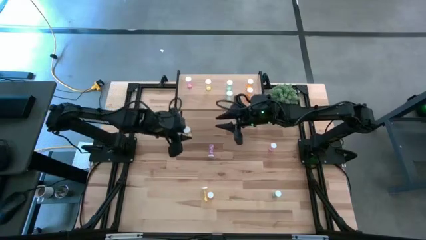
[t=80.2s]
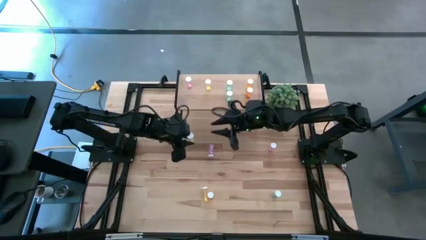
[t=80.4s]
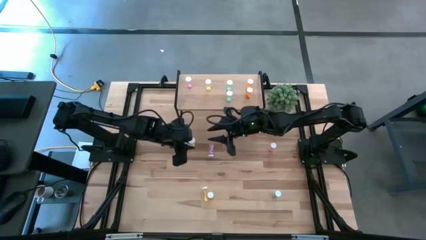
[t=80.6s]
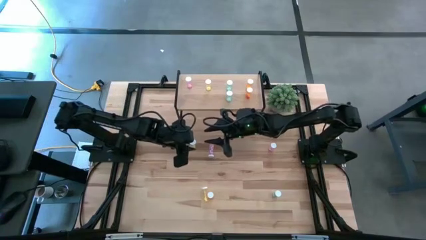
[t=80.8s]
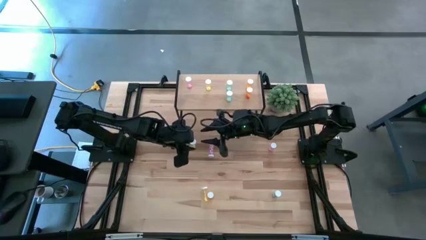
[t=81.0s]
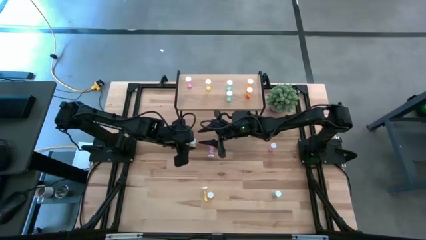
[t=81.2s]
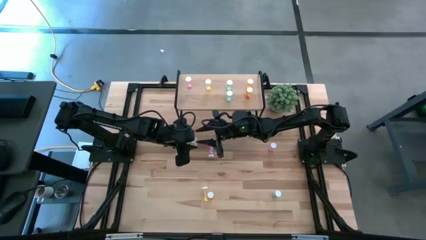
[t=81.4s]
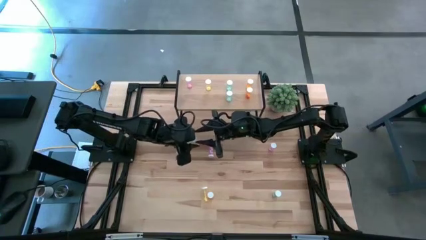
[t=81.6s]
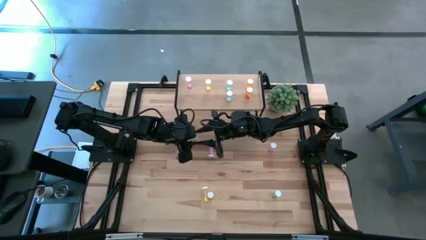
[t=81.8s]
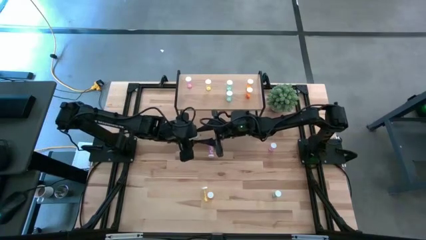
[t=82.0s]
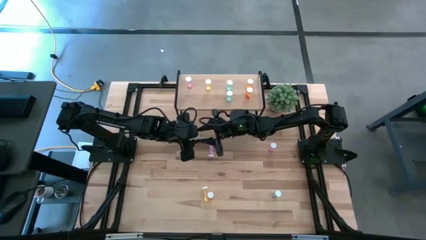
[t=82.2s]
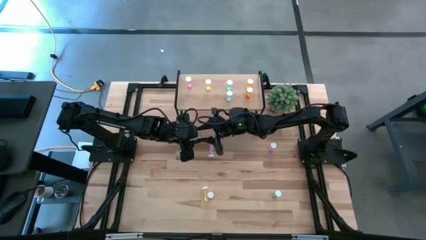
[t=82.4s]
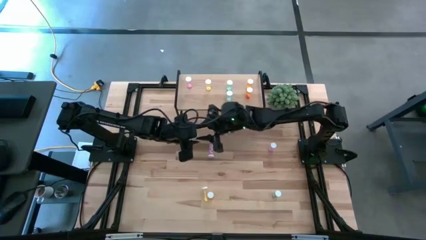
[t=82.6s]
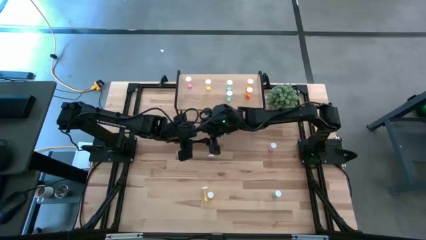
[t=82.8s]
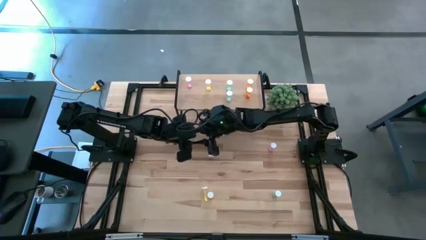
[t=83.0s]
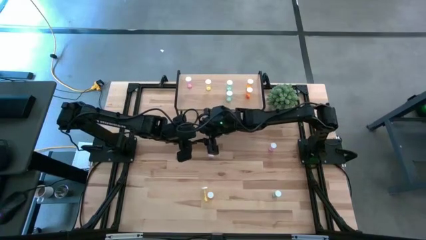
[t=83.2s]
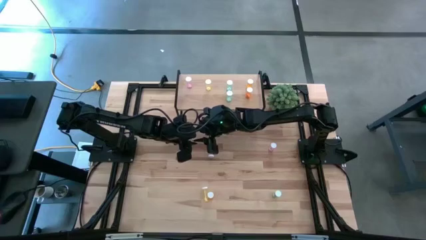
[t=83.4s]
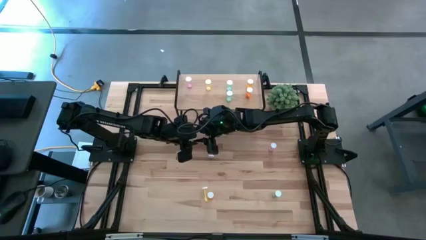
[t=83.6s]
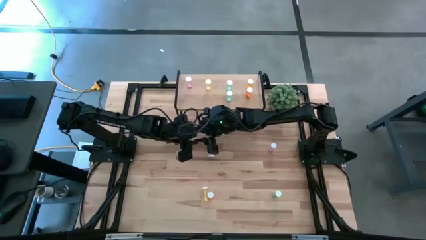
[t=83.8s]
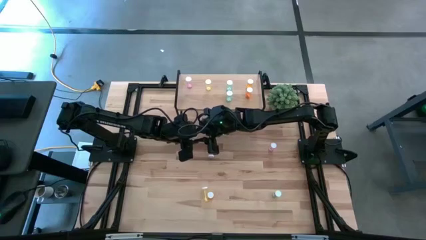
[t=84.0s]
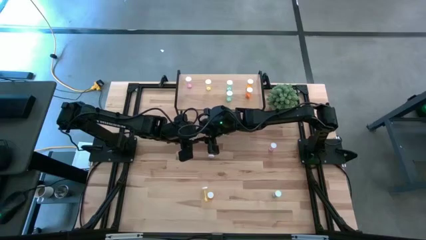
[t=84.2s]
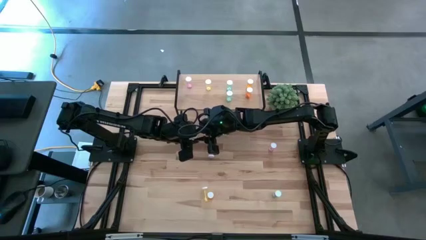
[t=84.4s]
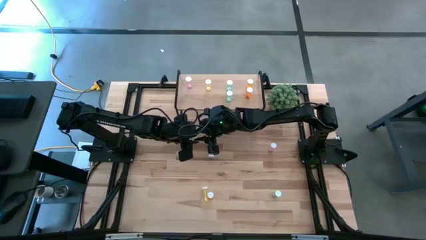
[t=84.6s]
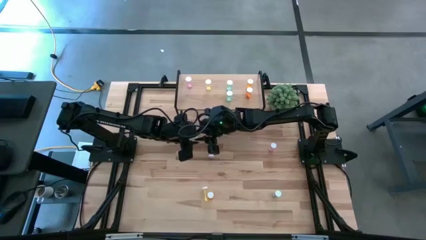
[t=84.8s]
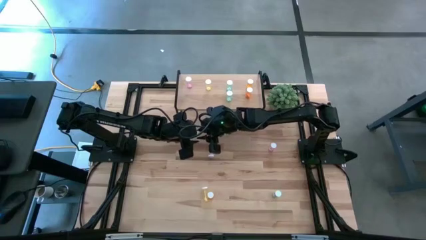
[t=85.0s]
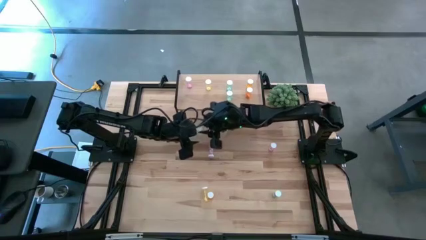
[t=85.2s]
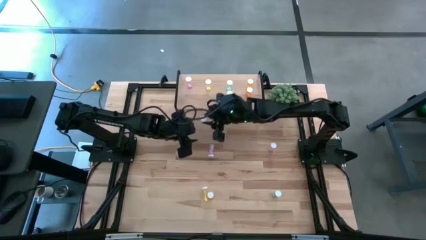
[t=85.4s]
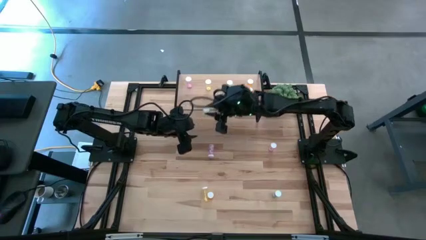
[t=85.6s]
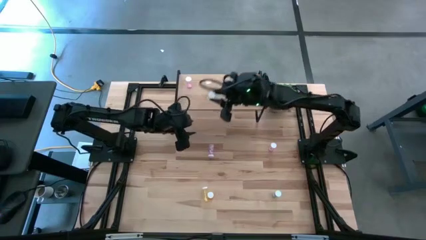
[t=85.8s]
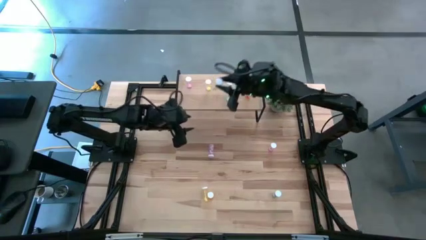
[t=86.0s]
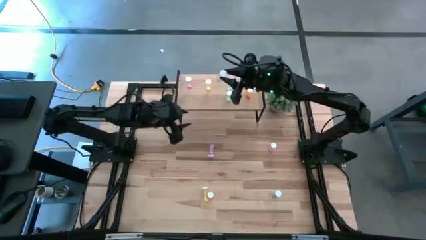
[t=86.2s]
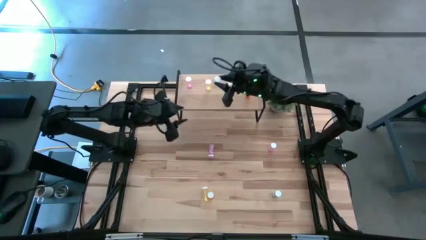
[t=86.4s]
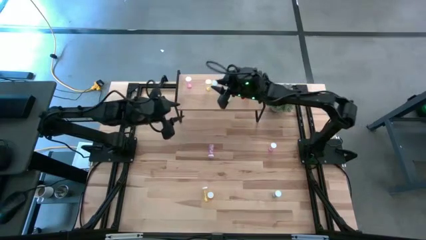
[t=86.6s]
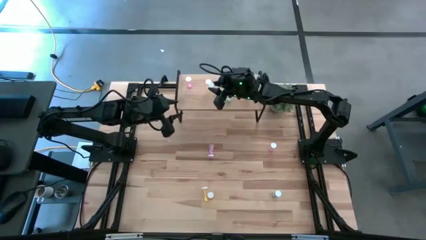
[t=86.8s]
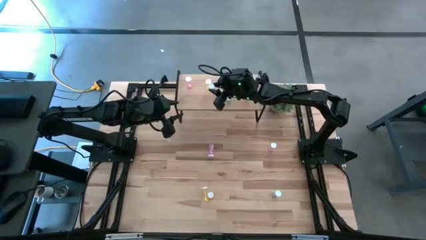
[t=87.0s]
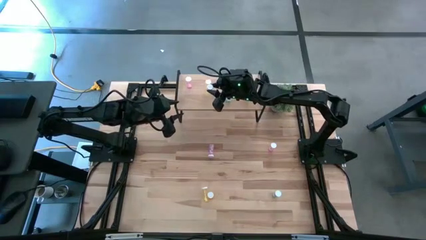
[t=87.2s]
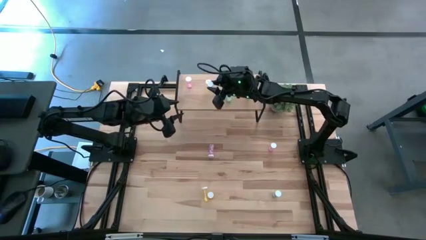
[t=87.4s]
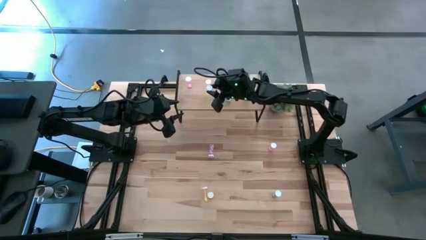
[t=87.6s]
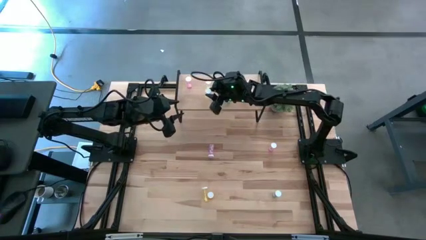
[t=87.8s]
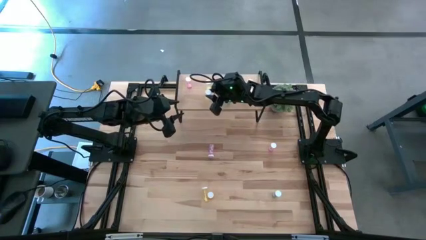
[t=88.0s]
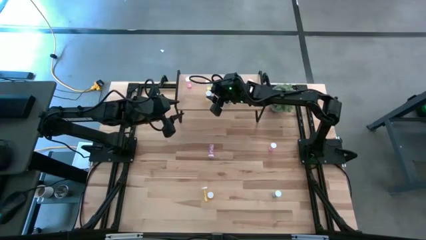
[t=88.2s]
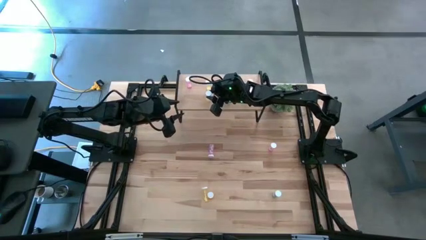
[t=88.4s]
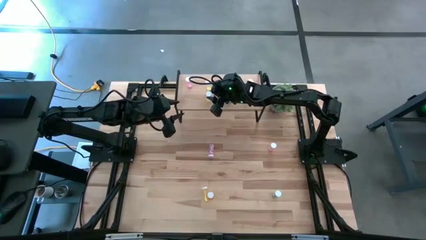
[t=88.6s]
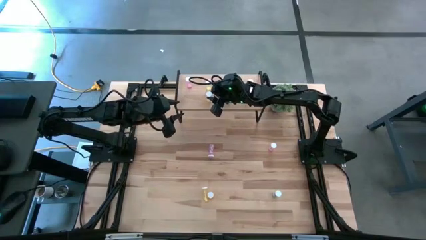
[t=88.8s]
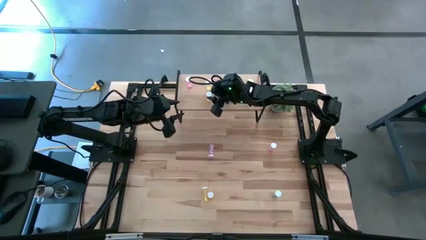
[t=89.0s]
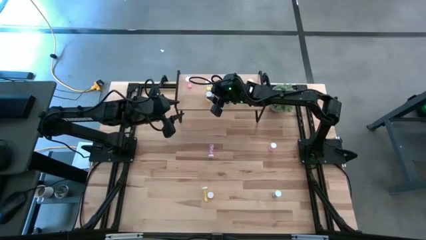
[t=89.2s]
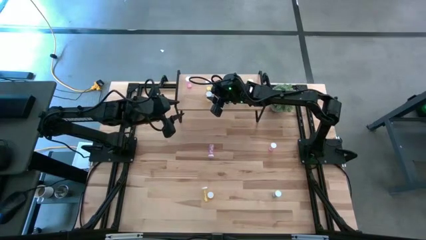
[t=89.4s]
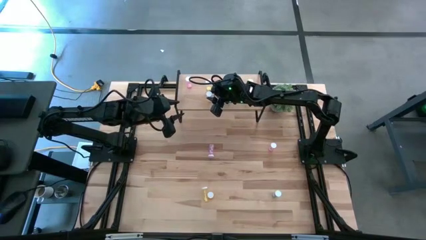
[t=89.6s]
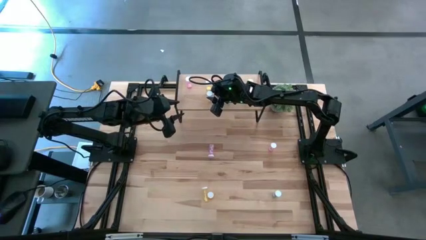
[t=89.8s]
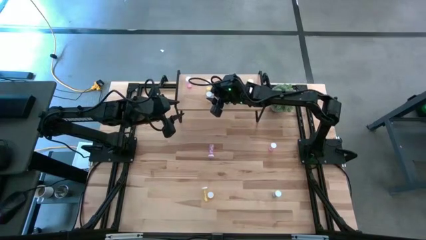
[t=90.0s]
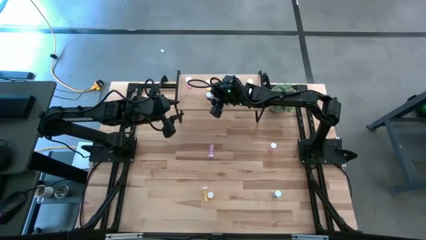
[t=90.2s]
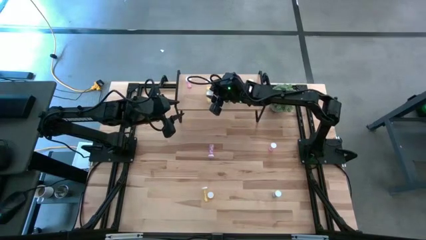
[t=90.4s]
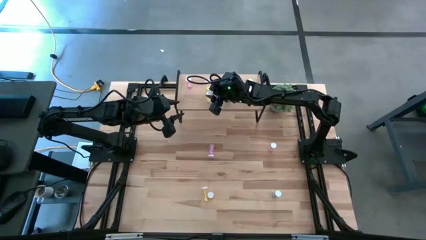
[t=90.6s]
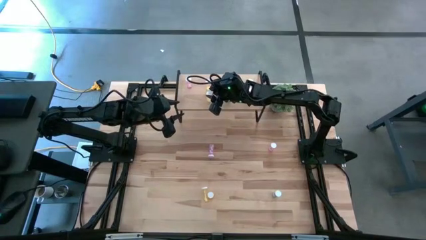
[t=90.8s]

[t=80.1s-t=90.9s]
Task: Pick and place medicine bottles onto shelf by color
Put the top yellow pill bottle aligned with the other yellow pill bottle on the shelf

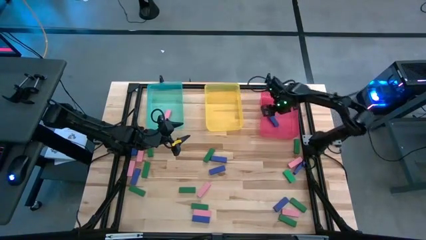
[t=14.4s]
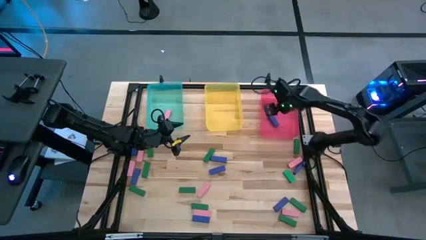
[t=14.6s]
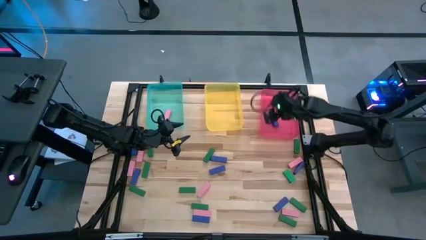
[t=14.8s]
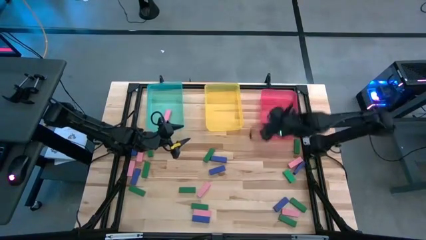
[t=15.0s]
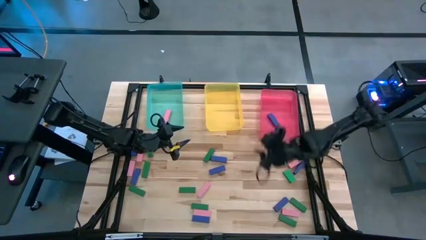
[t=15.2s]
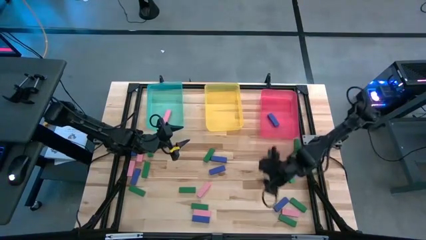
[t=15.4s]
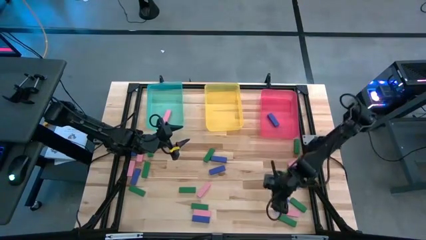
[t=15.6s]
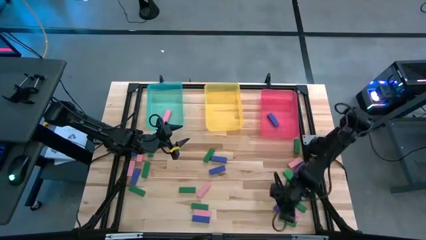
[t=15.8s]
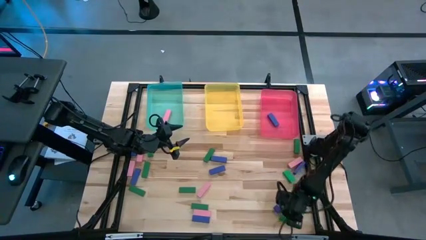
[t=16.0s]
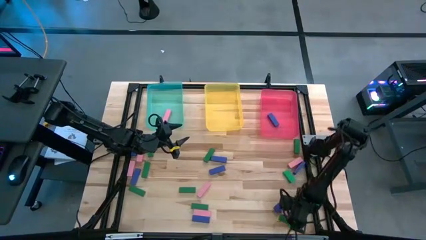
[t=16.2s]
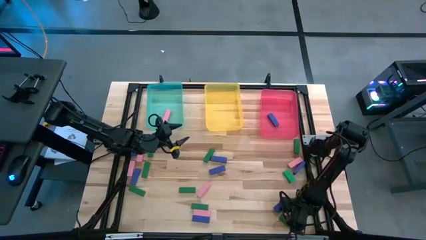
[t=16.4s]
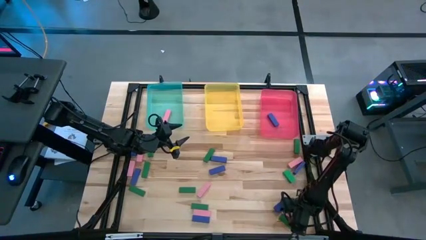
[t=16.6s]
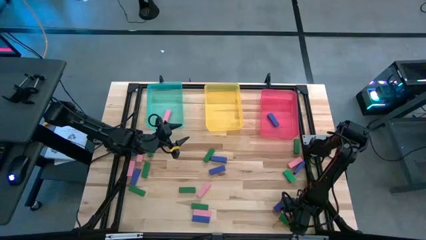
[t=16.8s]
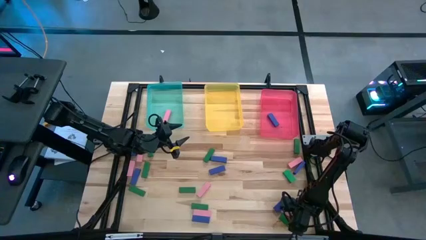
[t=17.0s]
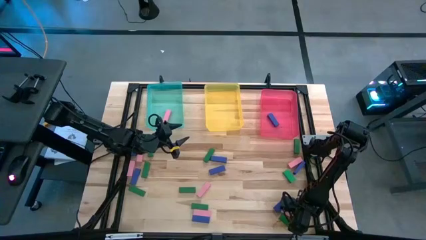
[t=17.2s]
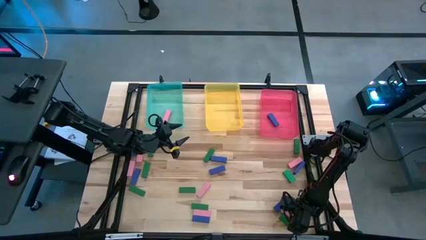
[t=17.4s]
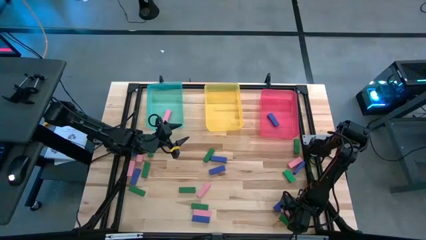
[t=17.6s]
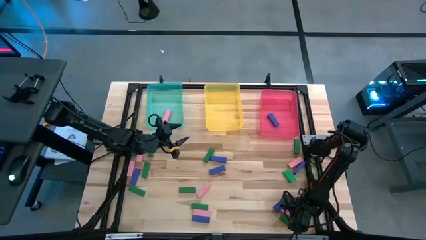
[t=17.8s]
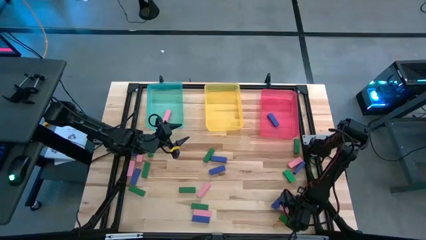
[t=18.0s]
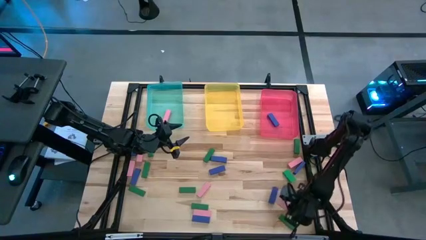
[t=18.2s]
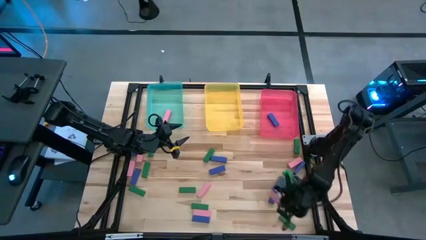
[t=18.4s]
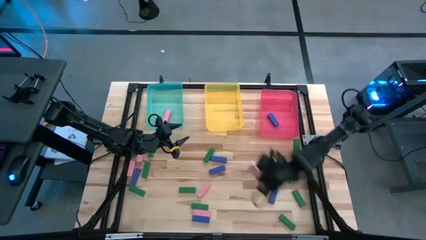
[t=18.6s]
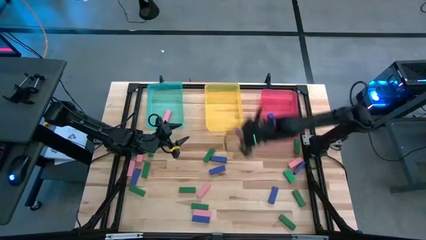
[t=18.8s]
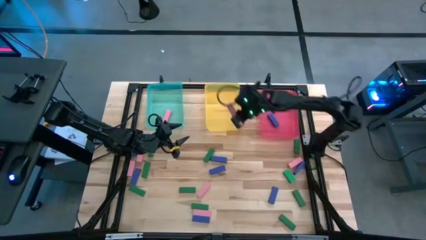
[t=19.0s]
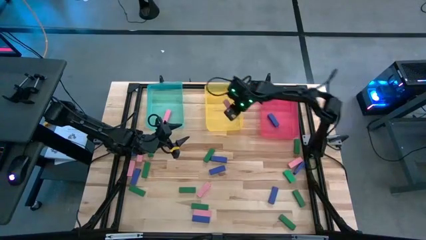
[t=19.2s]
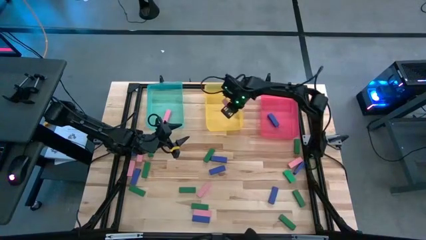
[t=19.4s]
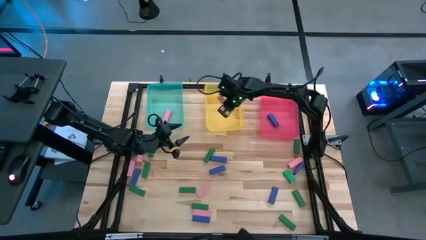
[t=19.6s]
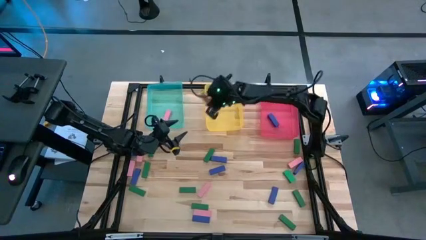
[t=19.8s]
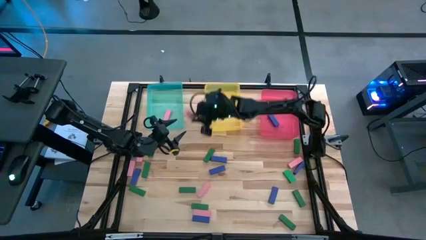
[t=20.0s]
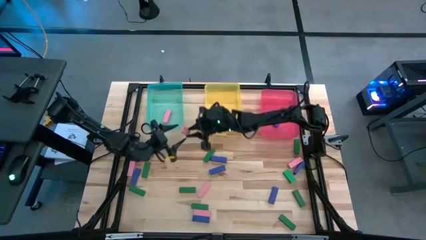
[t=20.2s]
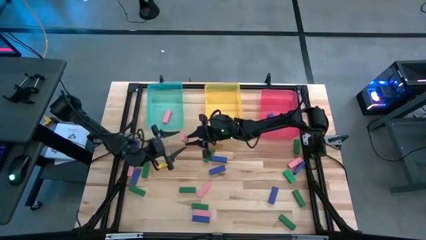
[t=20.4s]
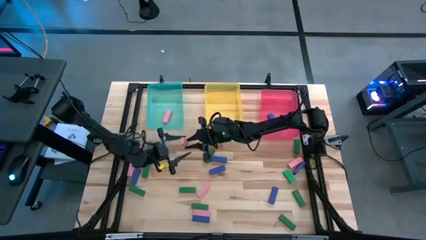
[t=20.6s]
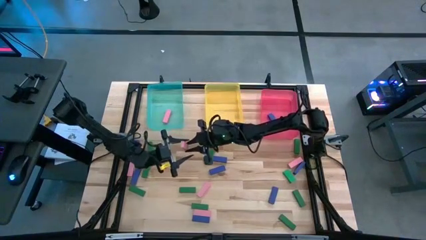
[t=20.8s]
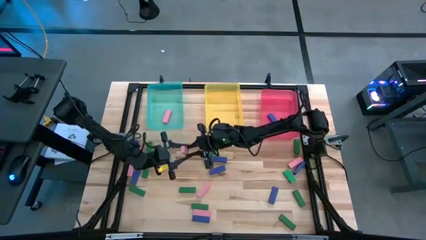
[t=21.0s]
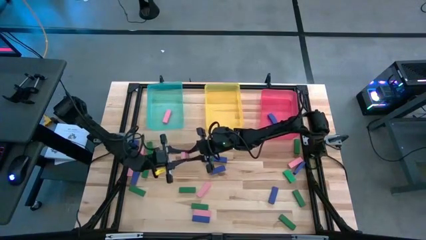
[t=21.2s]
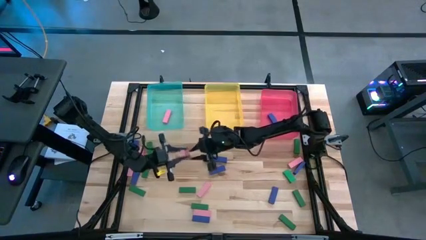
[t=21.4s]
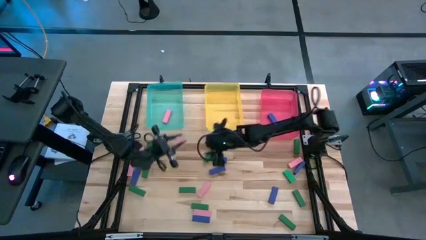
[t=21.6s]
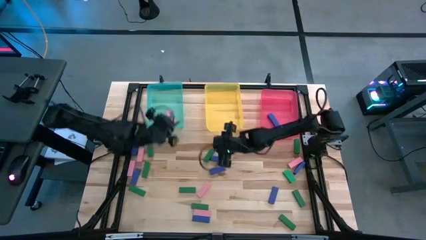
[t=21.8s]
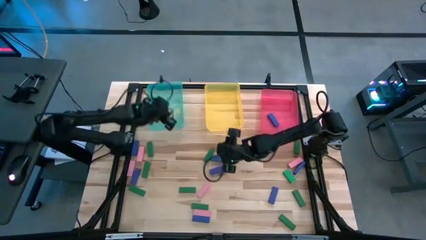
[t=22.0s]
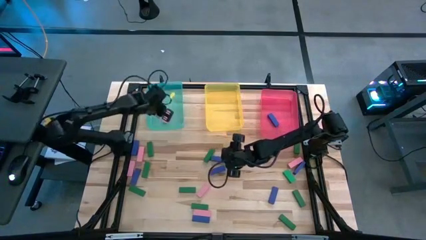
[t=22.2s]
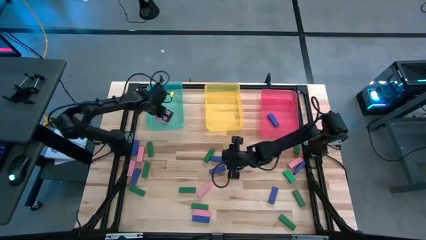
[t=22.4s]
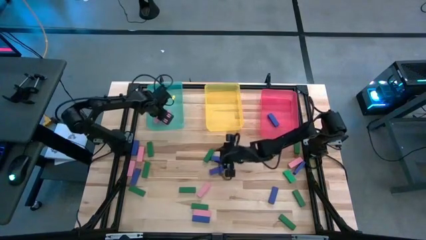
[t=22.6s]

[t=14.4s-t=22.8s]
Task: Sort blocks
Put the pink wooden block into the blue bin
